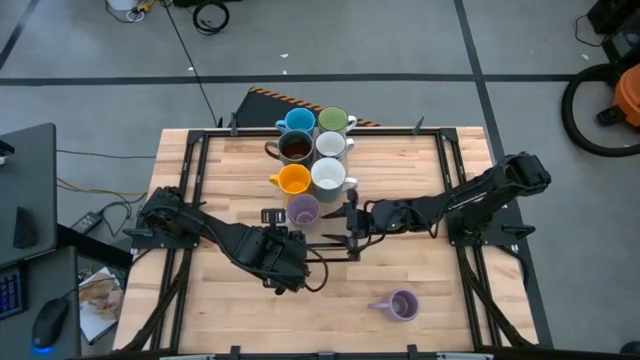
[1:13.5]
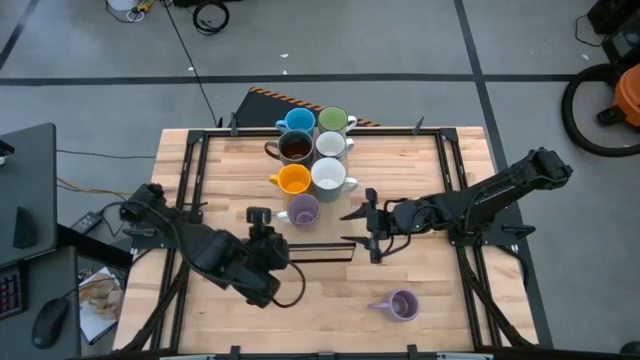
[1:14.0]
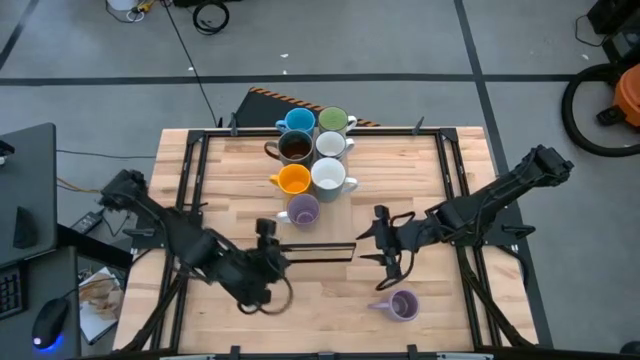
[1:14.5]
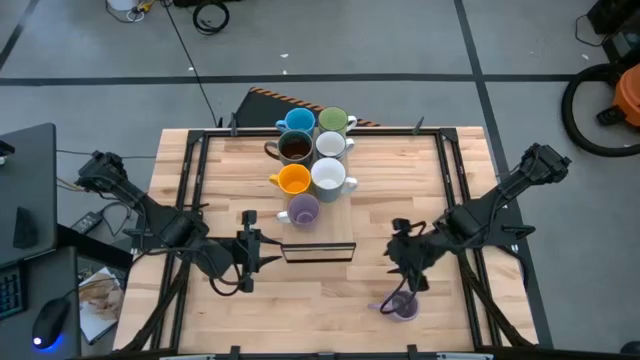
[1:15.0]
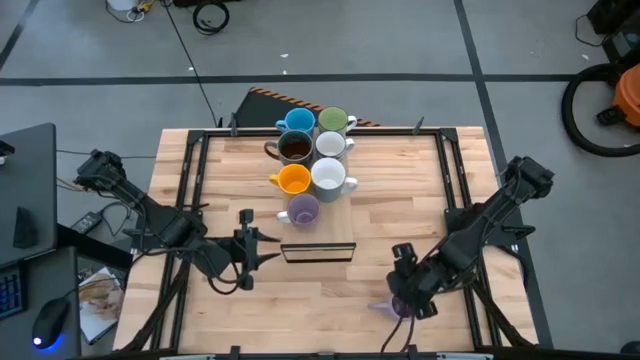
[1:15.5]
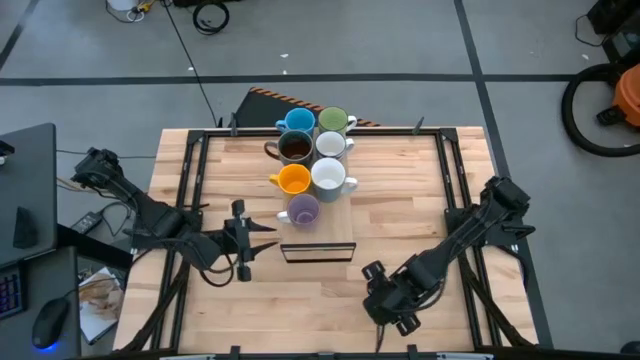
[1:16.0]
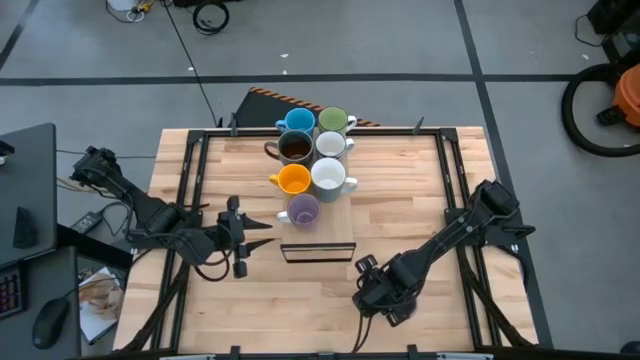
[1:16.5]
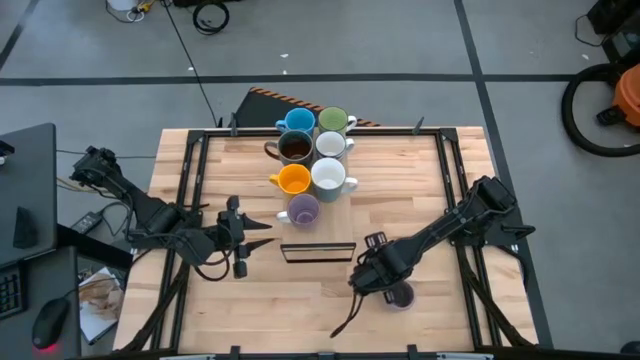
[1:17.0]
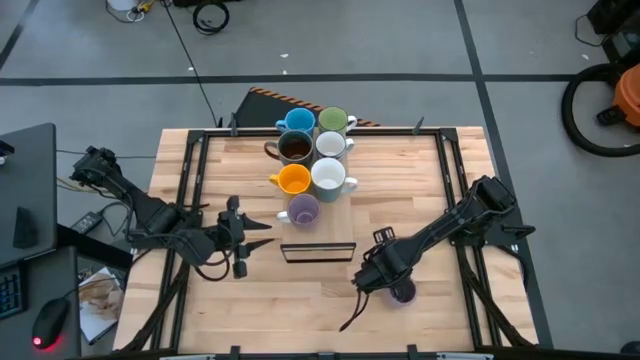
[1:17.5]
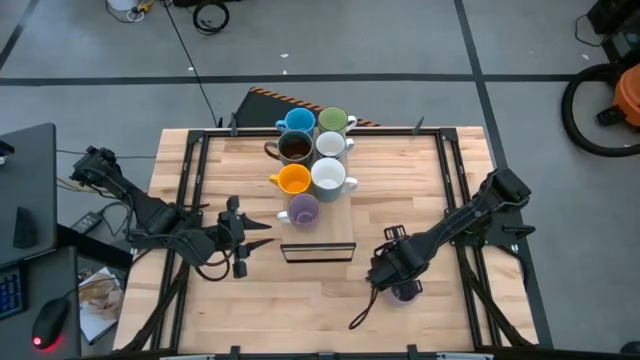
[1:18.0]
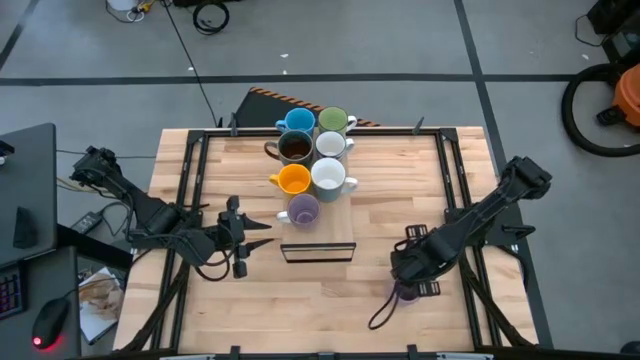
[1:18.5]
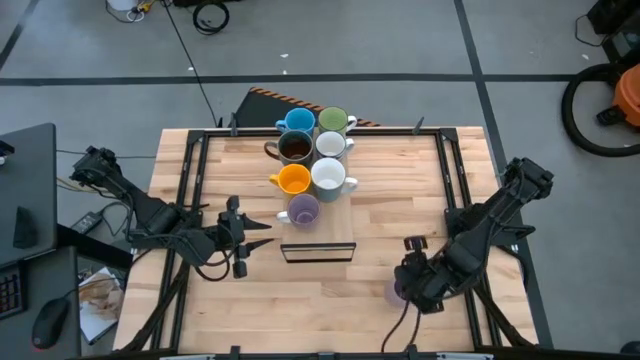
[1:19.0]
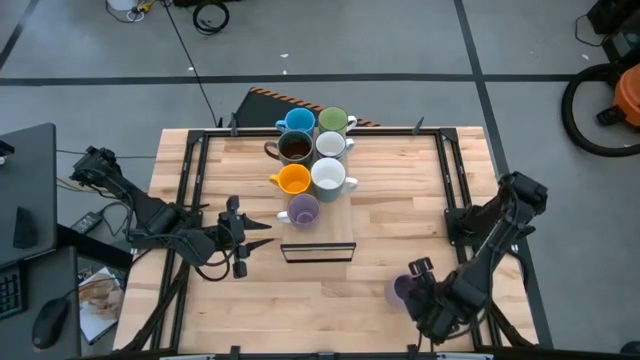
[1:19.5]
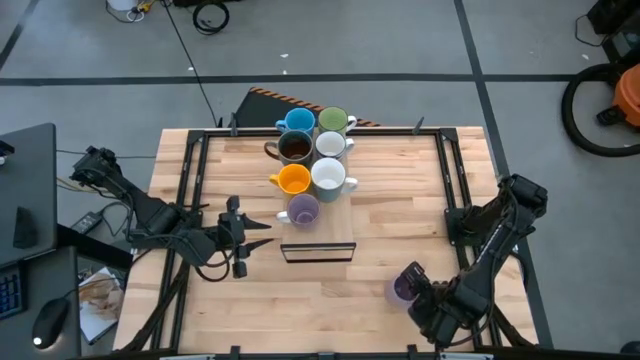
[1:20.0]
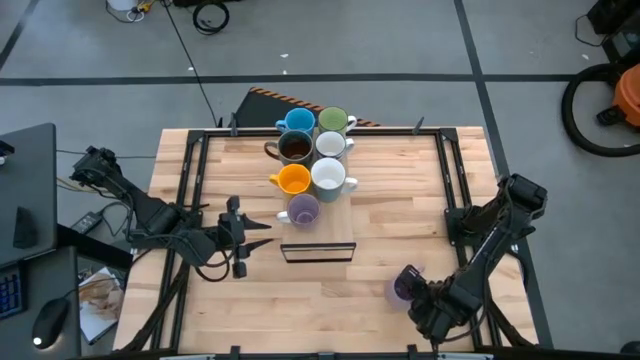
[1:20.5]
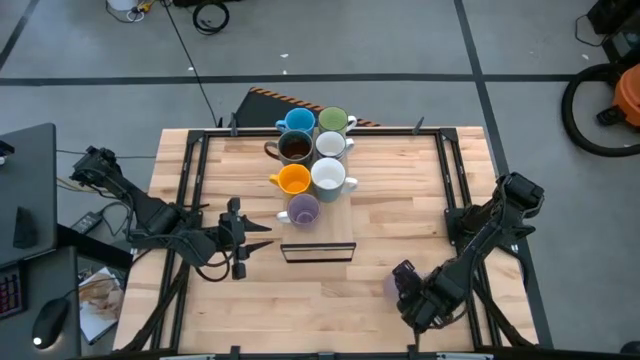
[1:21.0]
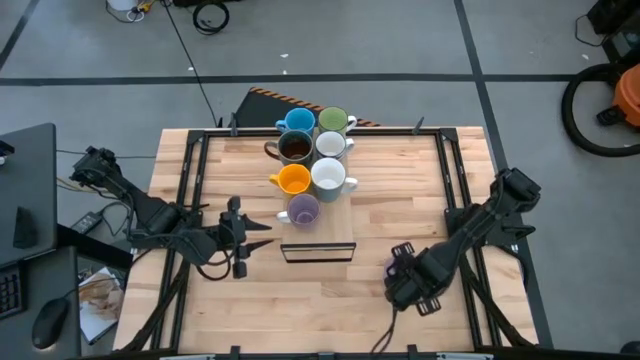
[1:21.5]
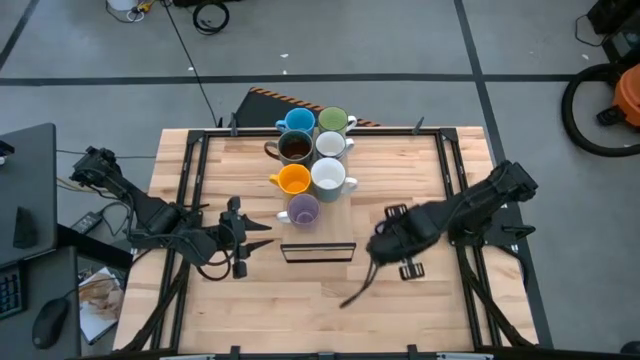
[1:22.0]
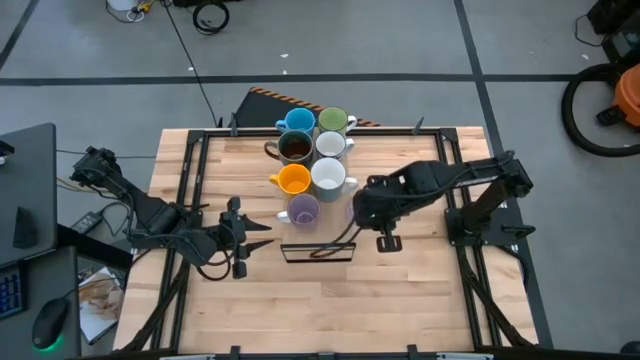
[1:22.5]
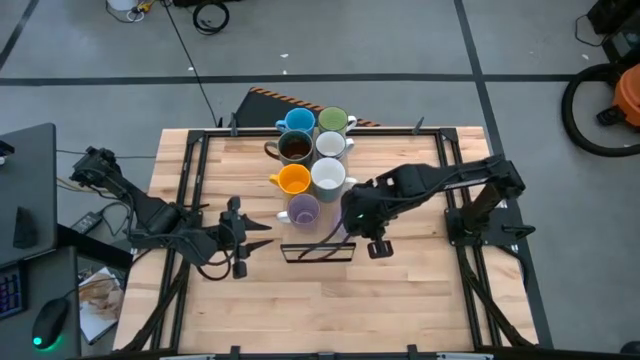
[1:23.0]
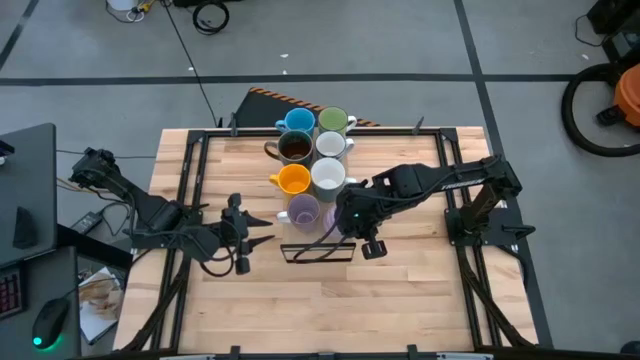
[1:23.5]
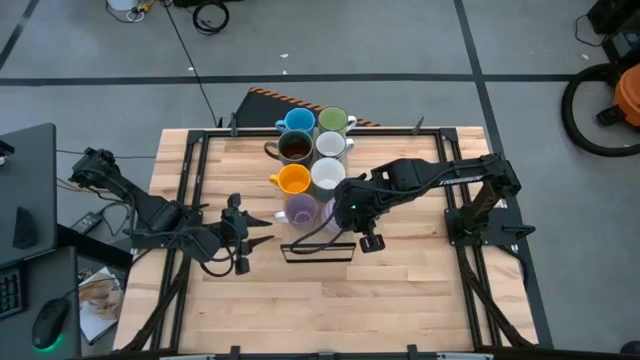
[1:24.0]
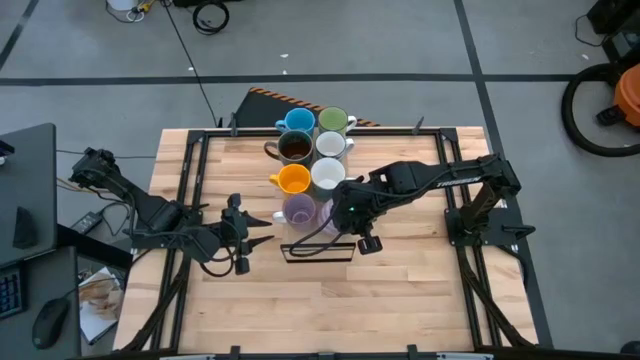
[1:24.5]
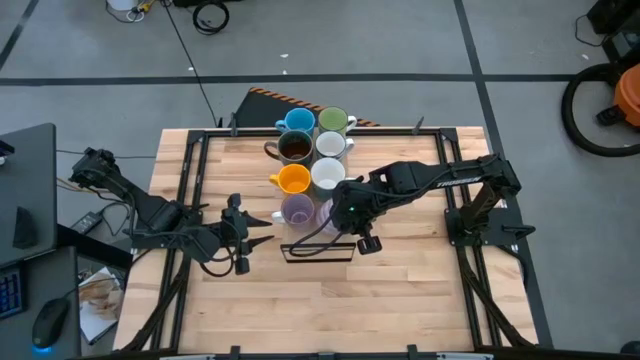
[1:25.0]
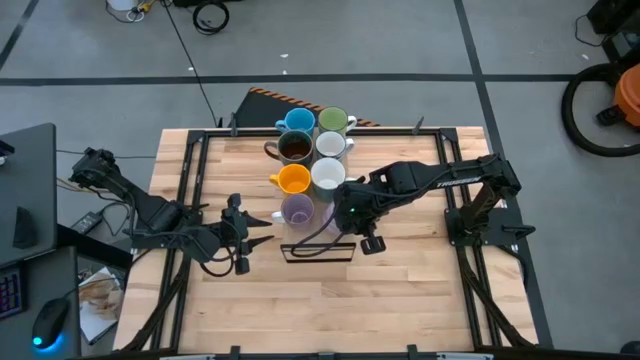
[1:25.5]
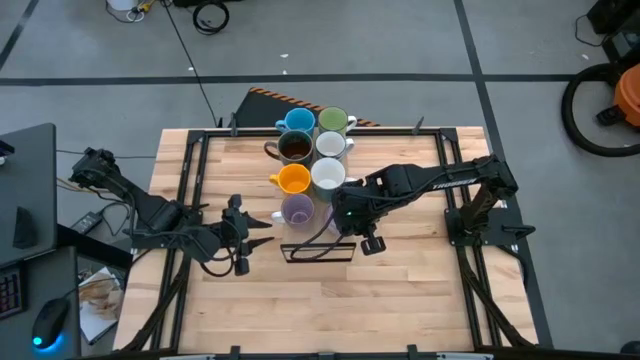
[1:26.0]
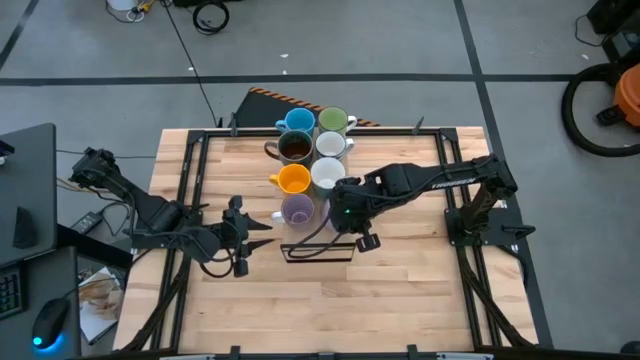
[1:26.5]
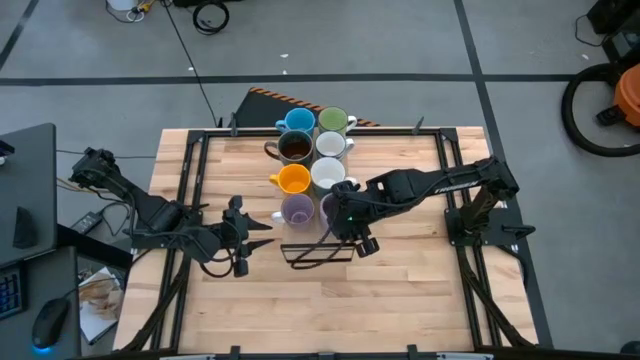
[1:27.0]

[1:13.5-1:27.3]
Task: Place coffee mugs
Put the light violet mug on the shelf

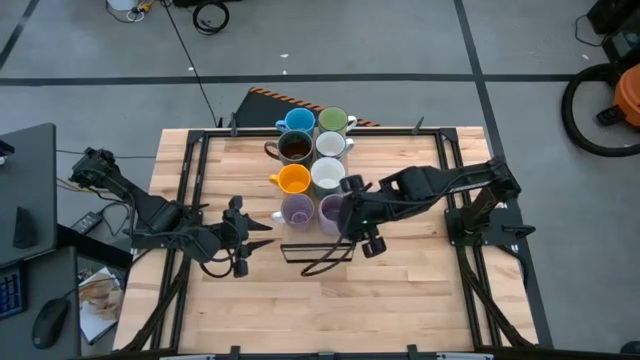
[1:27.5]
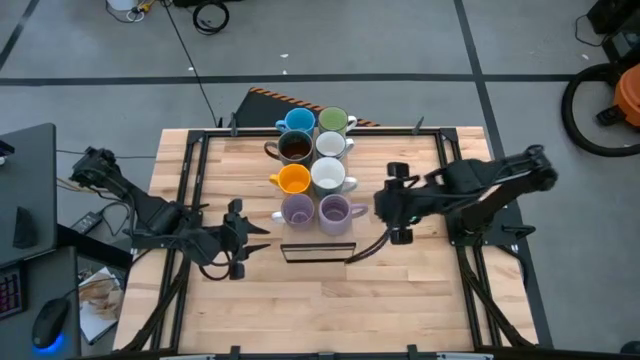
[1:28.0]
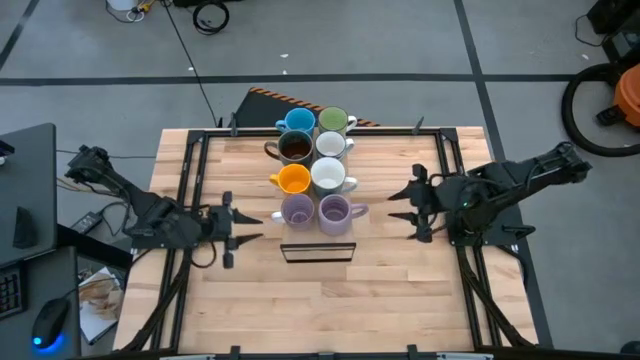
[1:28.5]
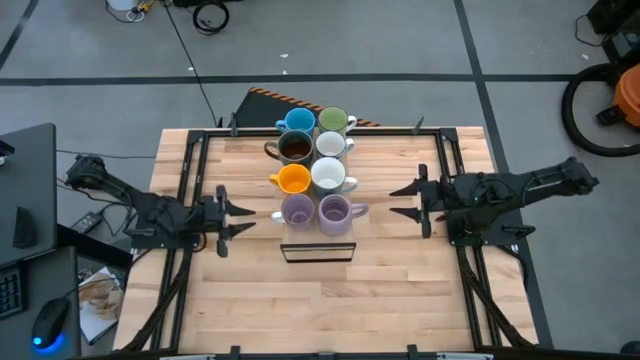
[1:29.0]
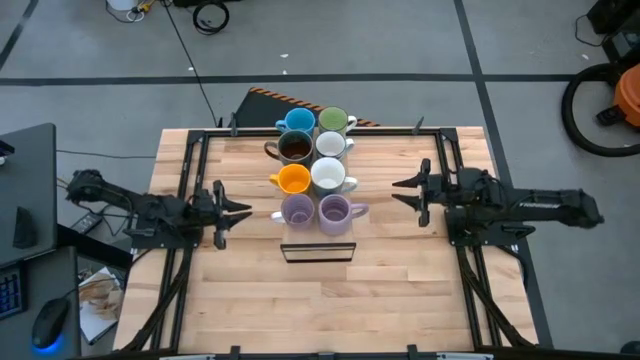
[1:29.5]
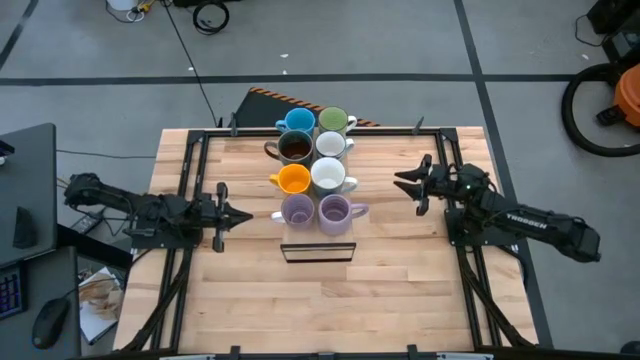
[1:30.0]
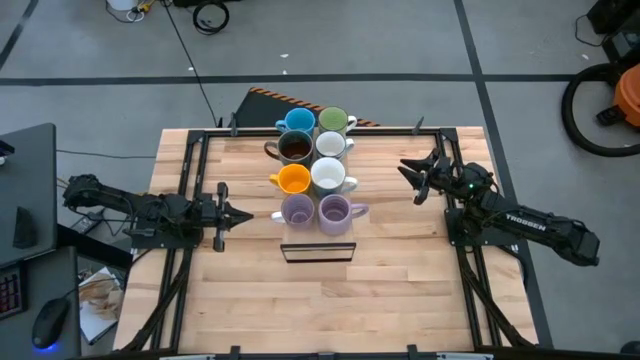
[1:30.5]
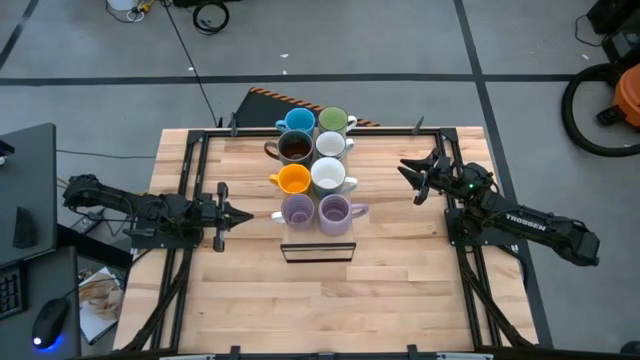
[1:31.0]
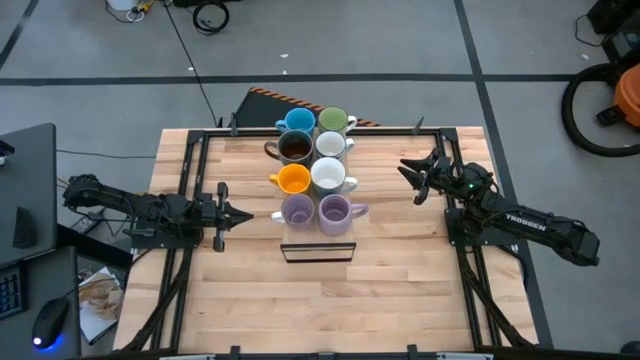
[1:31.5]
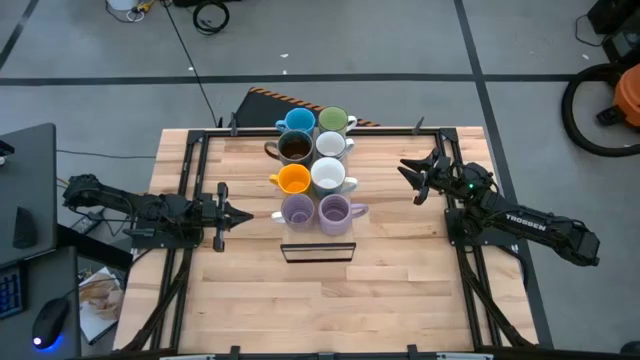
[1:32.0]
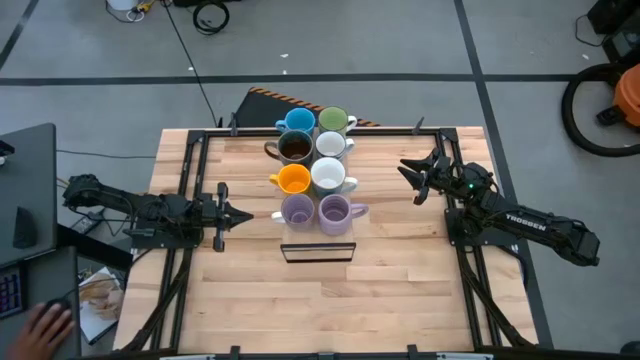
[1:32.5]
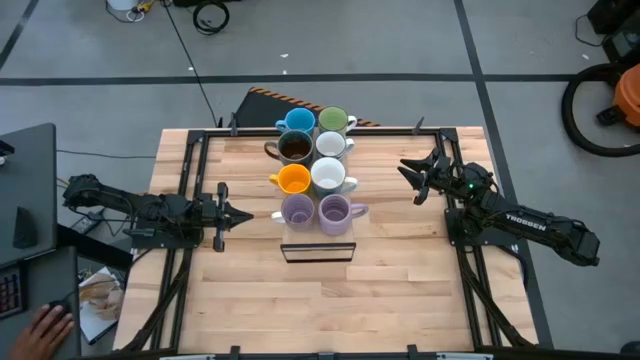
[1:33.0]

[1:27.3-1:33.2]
Return to Home Position

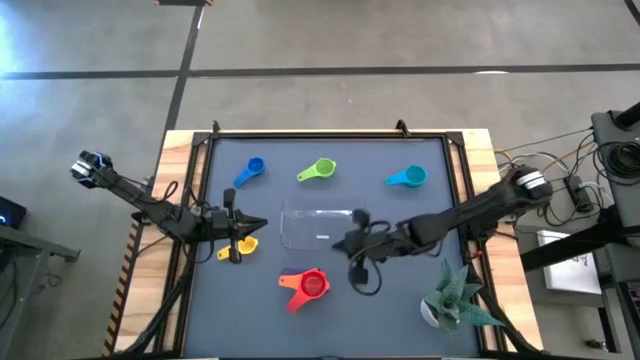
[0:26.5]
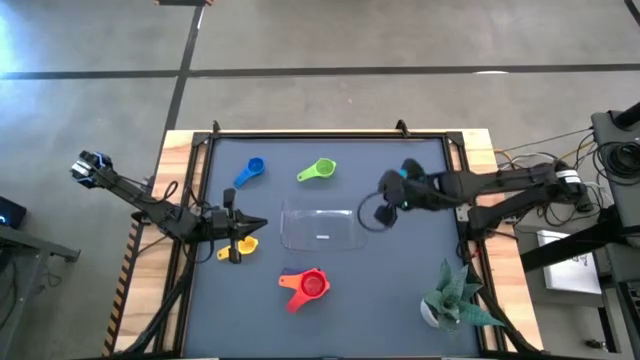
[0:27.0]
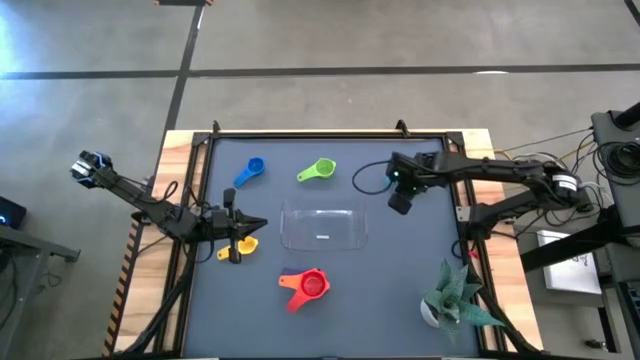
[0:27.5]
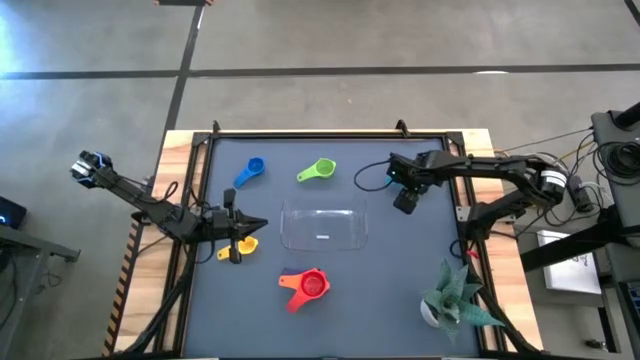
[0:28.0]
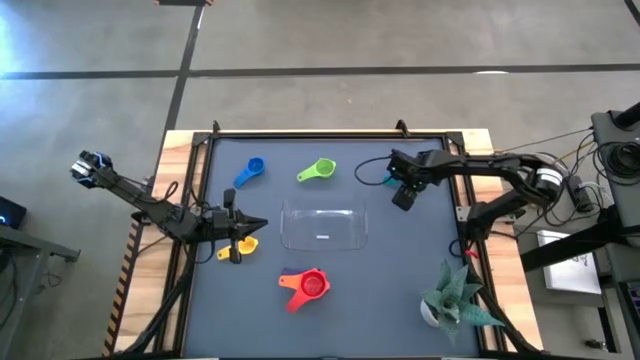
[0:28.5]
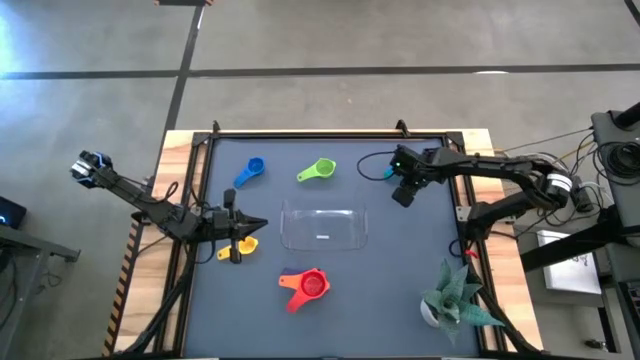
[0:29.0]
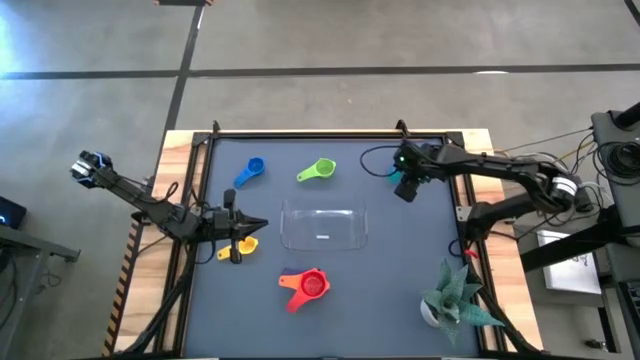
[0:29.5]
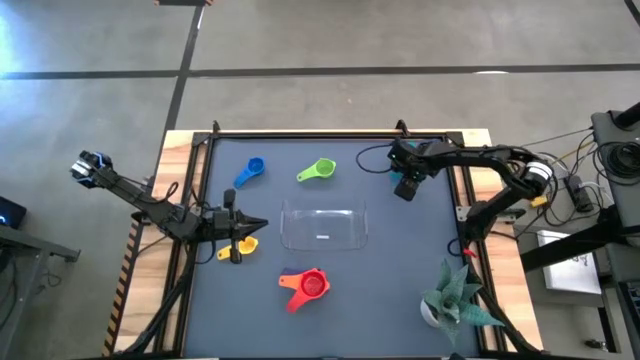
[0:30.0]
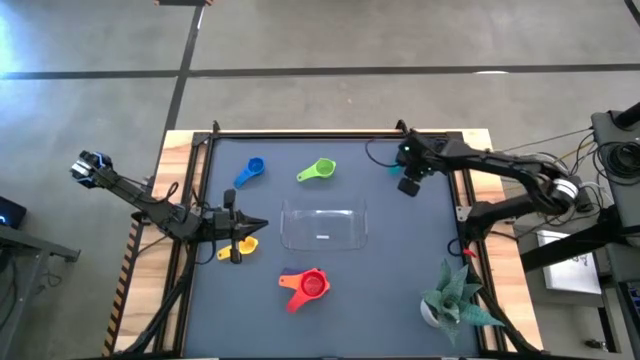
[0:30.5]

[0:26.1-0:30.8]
Task: Nest measuring cups in basket
Stack the light blue measuring cup on top of the red measuring cup
